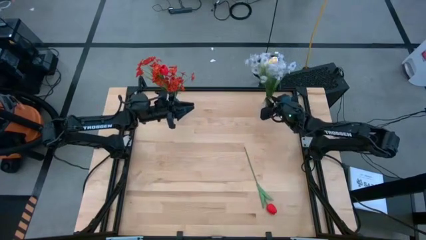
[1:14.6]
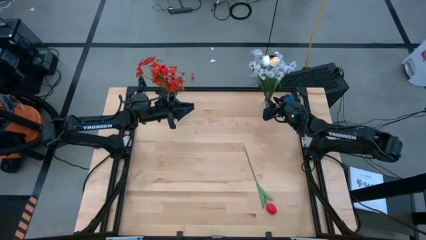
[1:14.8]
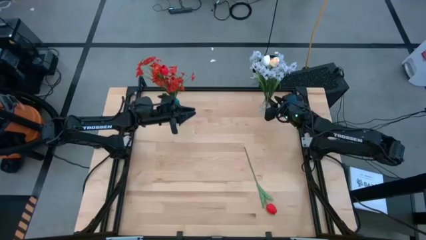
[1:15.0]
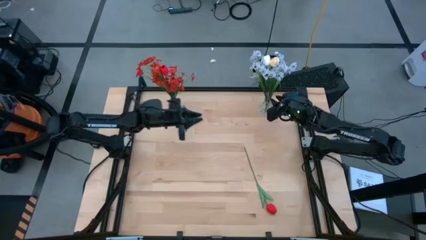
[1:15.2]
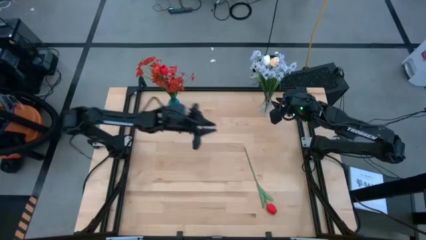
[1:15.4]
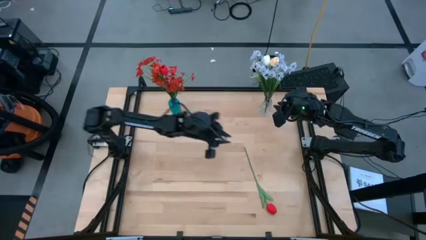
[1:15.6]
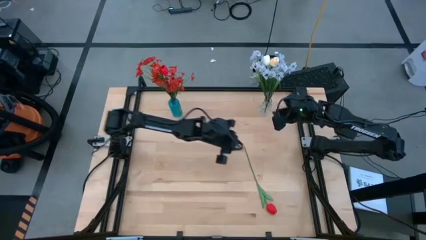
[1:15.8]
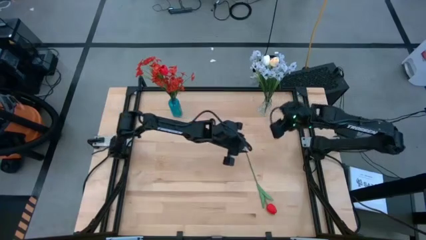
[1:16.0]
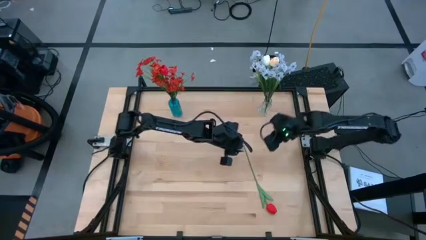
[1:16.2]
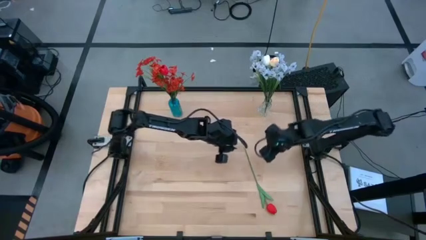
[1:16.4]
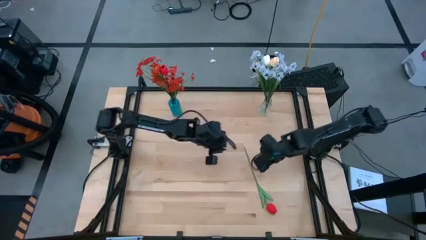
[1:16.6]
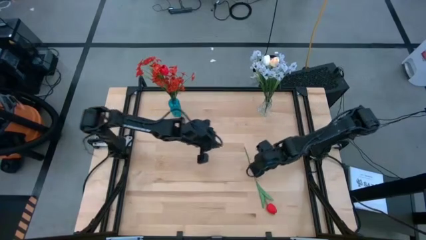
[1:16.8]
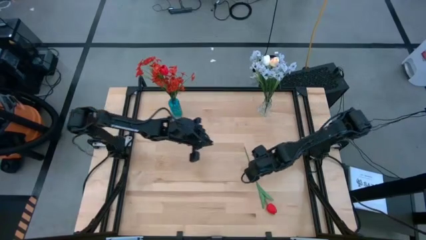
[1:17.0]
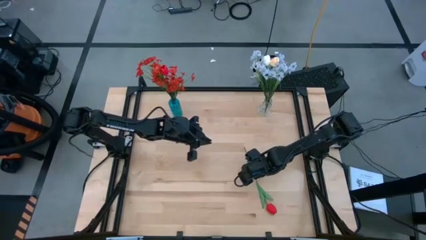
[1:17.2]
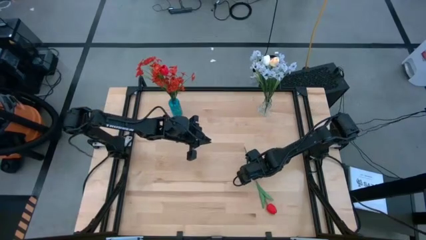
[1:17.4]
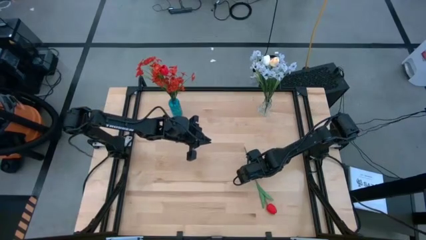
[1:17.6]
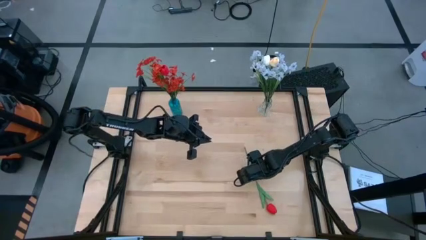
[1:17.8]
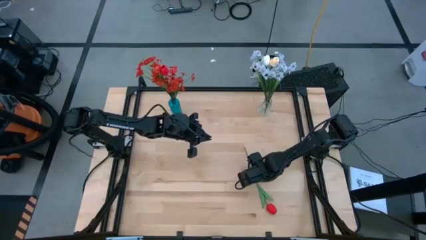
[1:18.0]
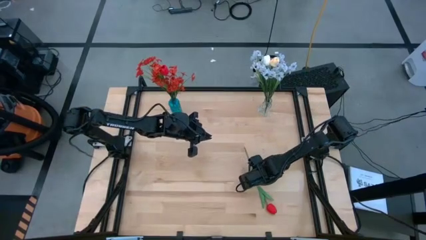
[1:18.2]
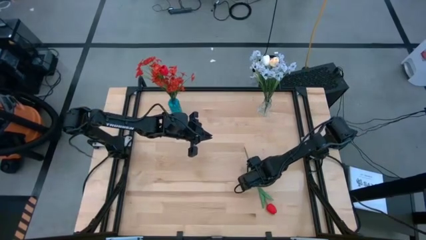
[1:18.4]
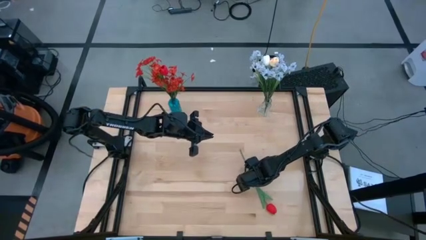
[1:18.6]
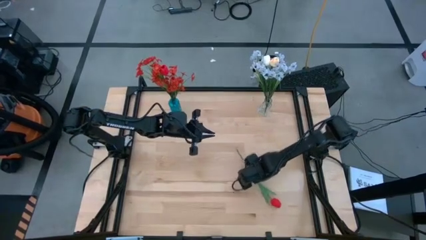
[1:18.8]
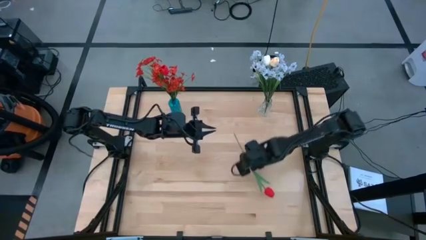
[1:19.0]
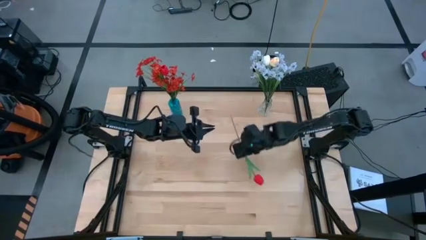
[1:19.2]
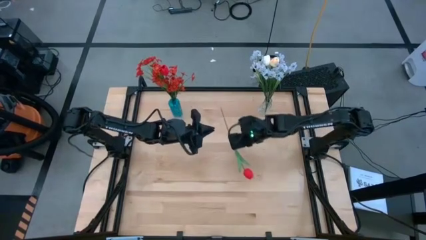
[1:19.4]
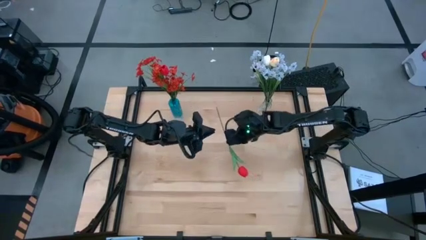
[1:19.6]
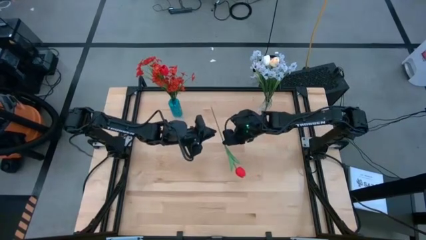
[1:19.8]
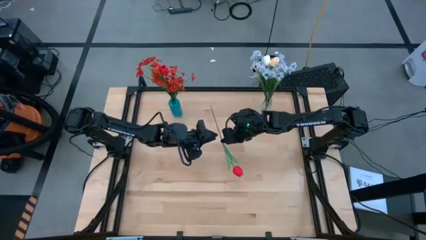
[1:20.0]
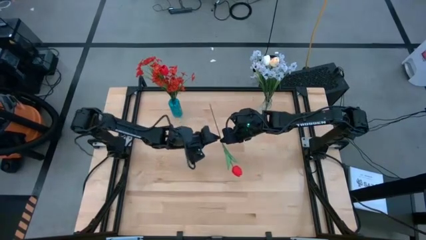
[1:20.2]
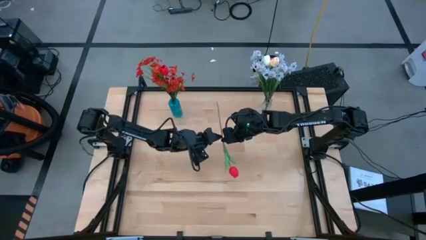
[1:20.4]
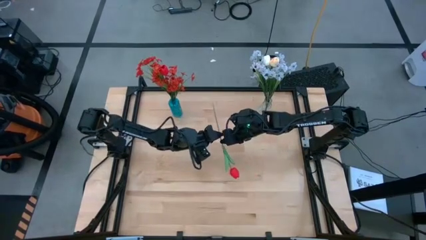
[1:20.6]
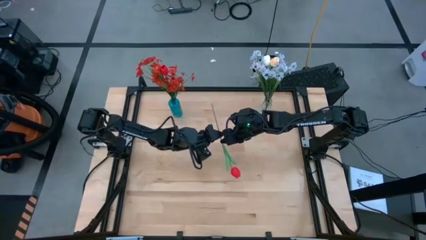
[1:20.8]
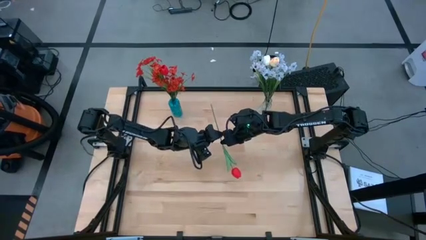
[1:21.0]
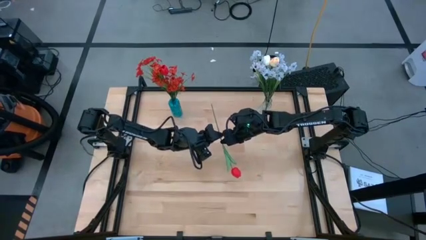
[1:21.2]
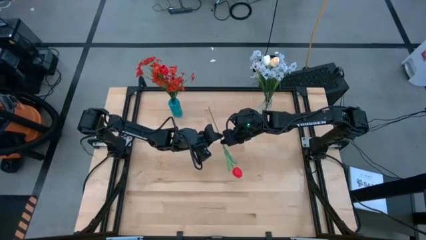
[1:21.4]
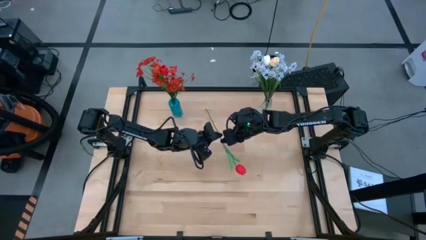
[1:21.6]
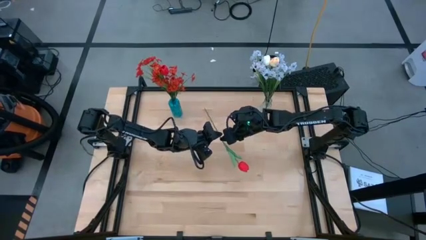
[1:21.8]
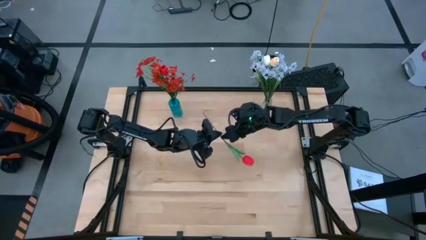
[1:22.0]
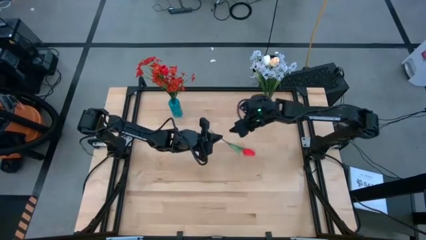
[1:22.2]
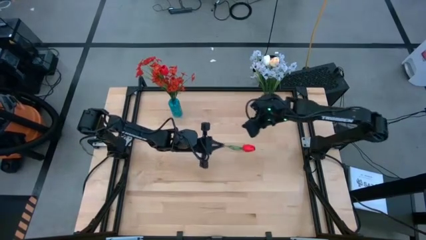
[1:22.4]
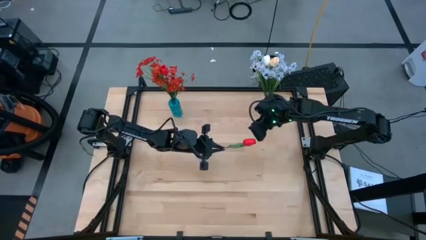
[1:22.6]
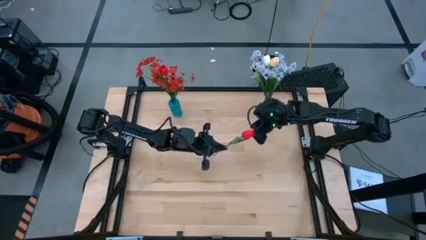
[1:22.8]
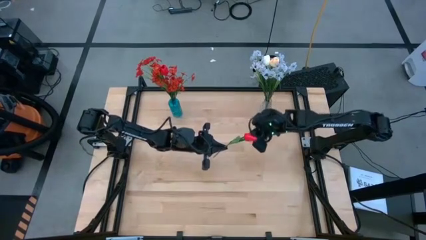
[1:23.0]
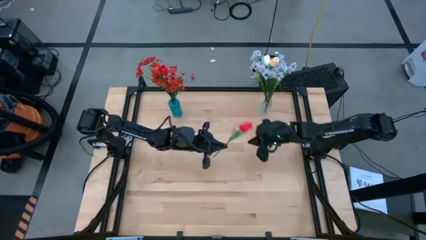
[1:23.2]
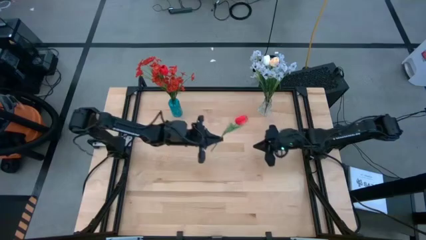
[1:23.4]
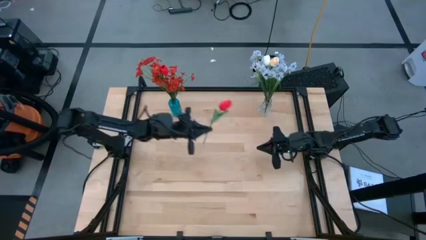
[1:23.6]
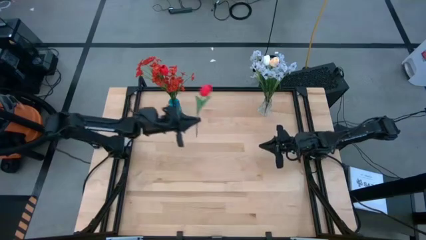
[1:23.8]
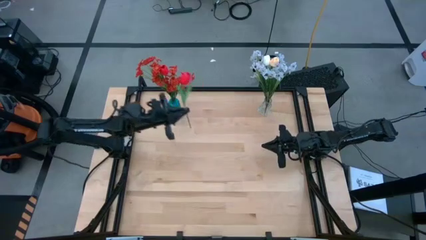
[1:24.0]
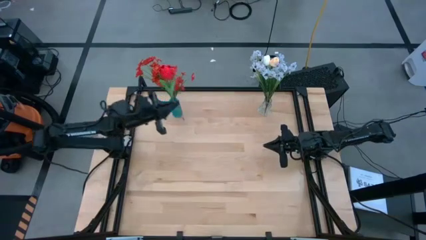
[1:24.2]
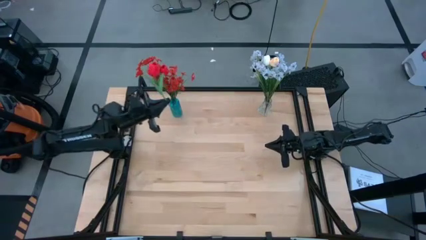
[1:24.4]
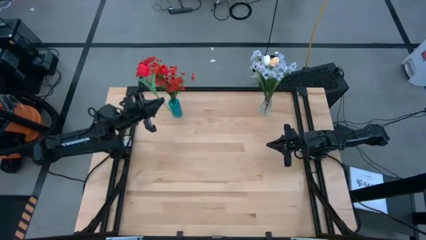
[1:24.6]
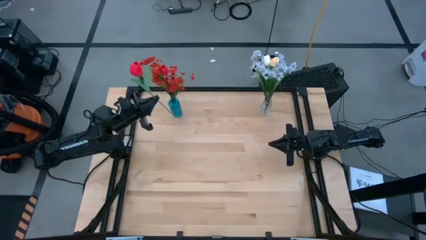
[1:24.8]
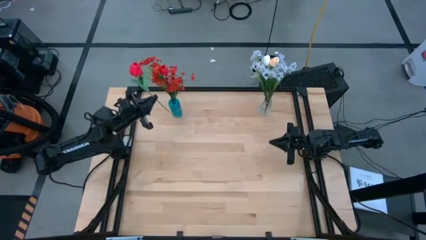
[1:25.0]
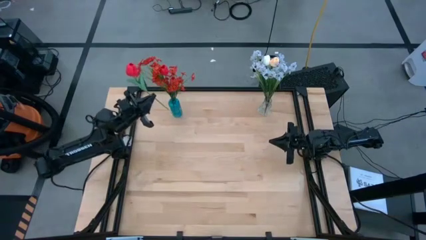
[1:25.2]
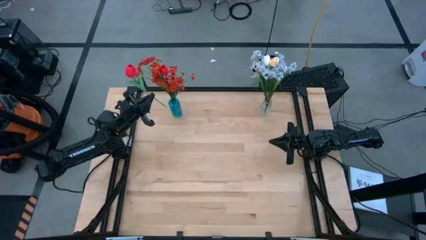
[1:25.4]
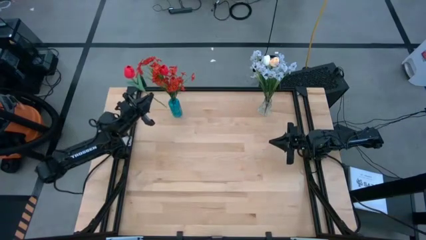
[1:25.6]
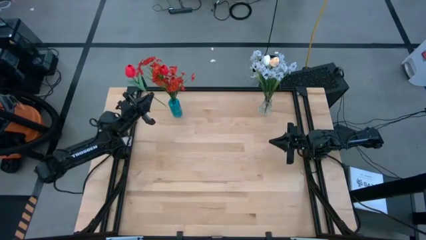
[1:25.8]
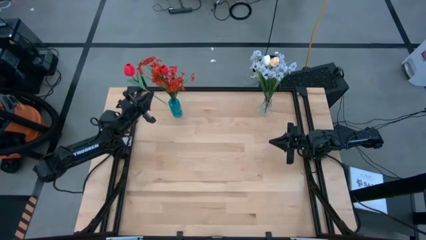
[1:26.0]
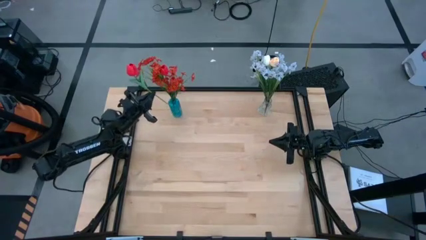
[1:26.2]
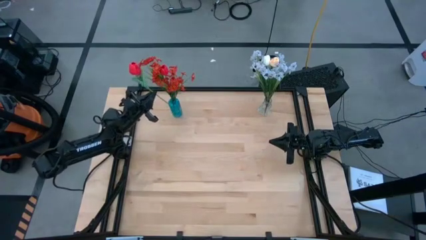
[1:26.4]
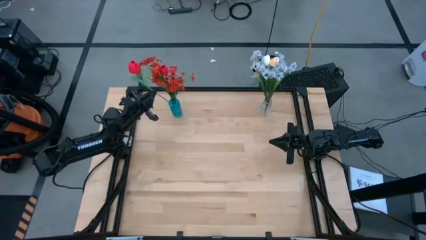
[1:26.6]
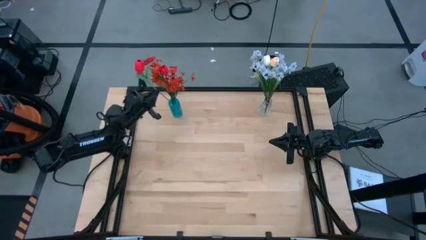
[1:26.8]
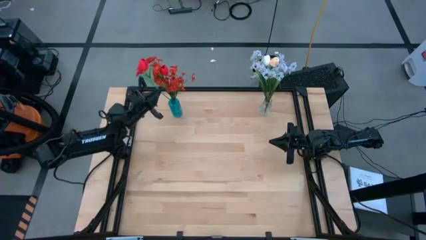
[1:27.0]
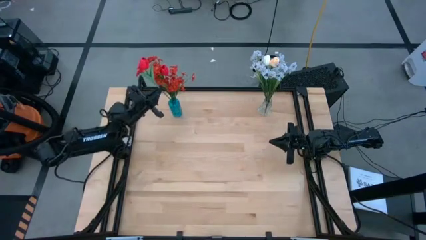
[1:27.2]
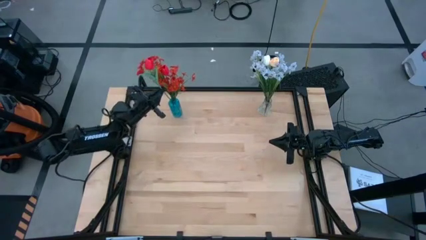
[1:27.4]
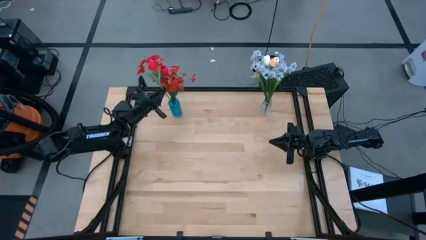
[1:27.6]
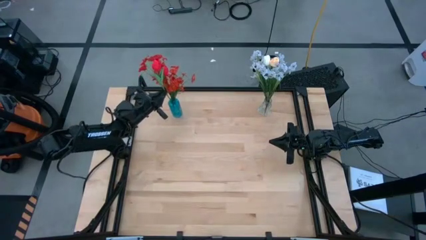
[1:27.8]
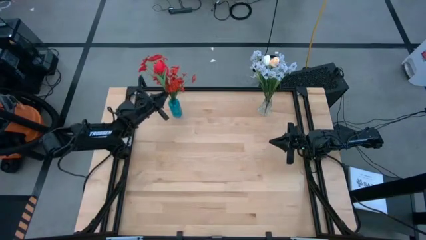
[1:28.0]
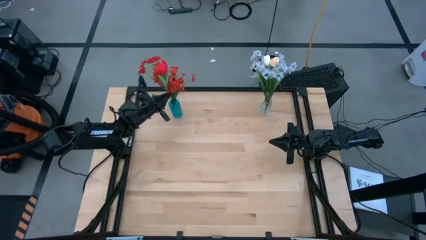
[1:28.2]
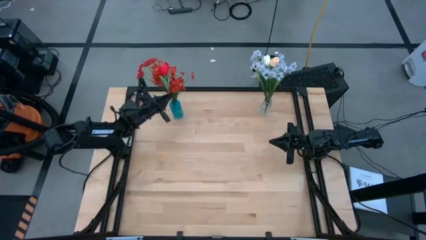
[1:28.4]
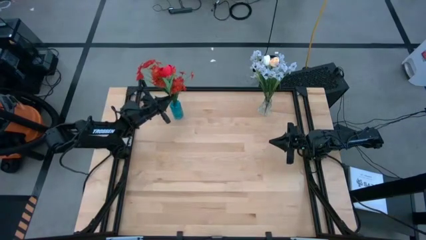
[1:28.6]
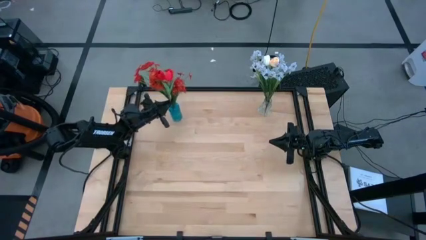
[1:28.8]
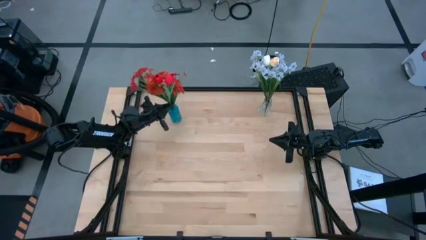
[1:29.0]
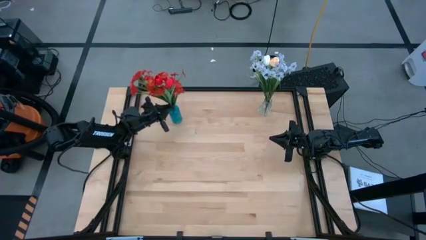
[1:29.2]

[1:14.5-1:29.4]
Task: Sort flowers into vase by color
Put the red flower into the blue vase
